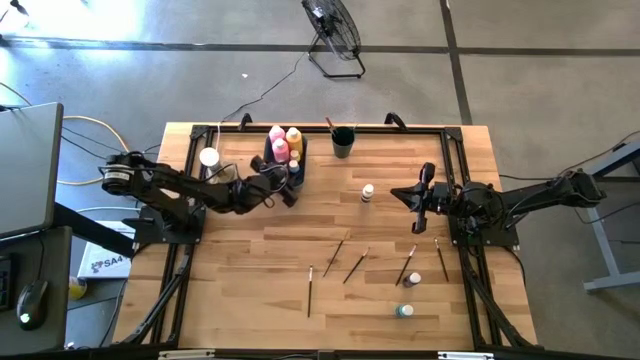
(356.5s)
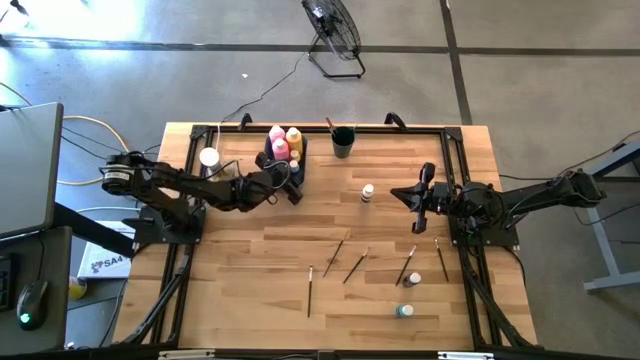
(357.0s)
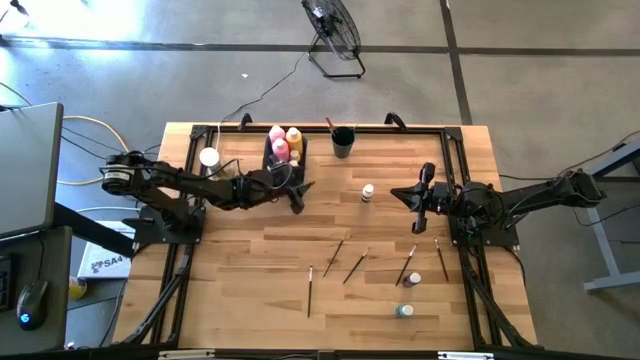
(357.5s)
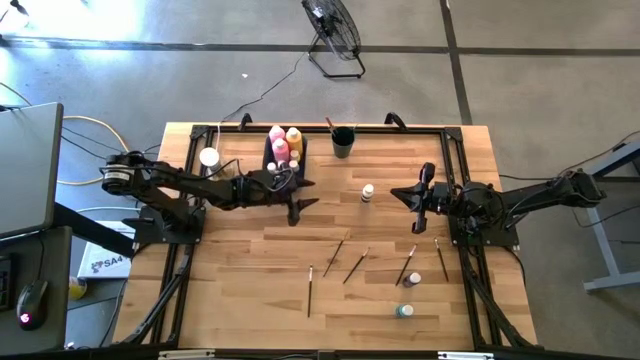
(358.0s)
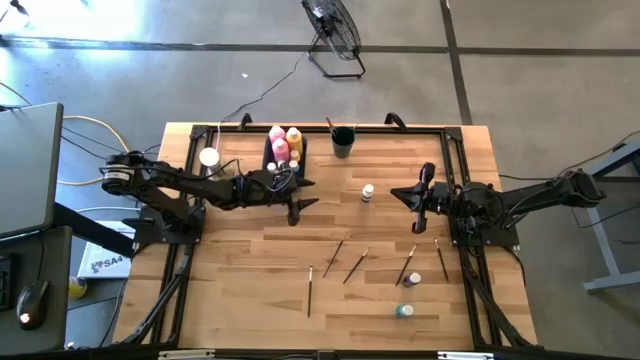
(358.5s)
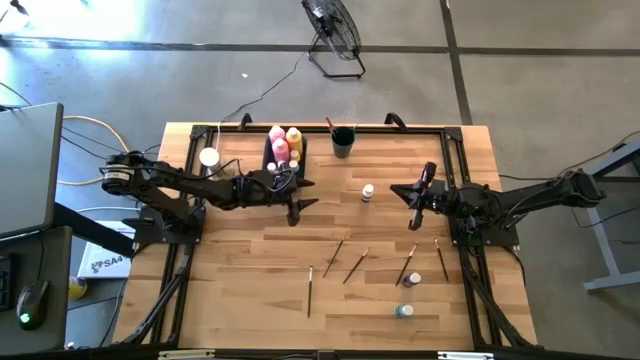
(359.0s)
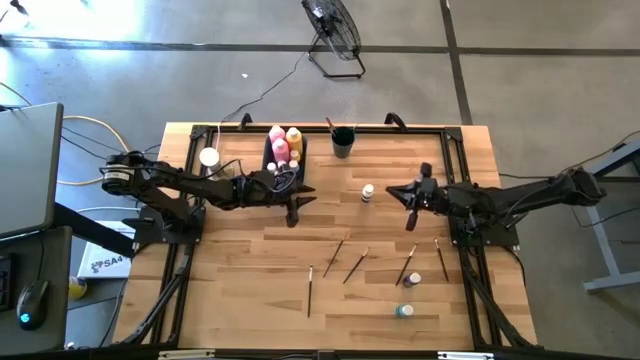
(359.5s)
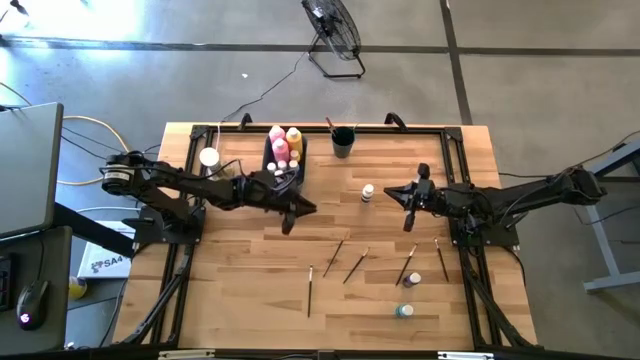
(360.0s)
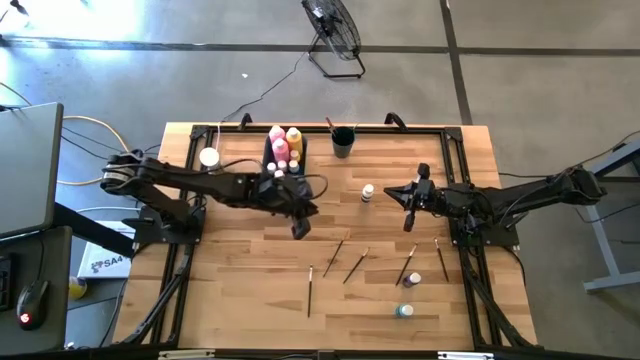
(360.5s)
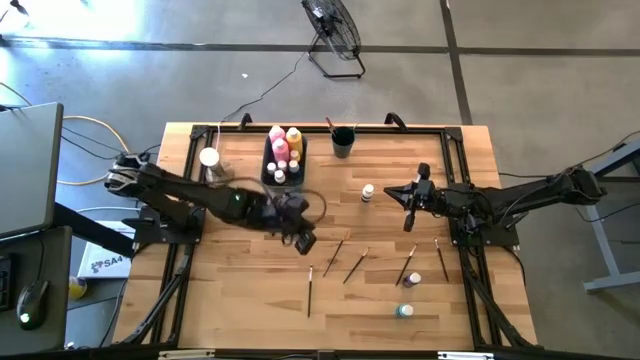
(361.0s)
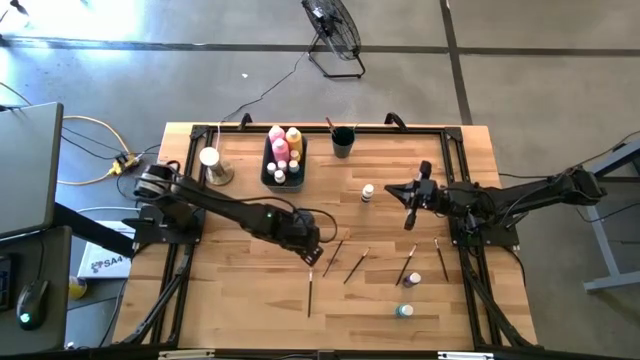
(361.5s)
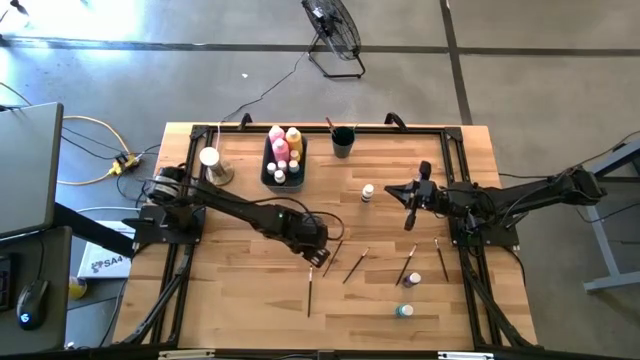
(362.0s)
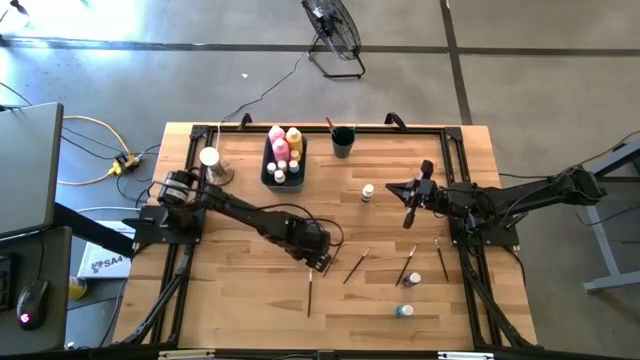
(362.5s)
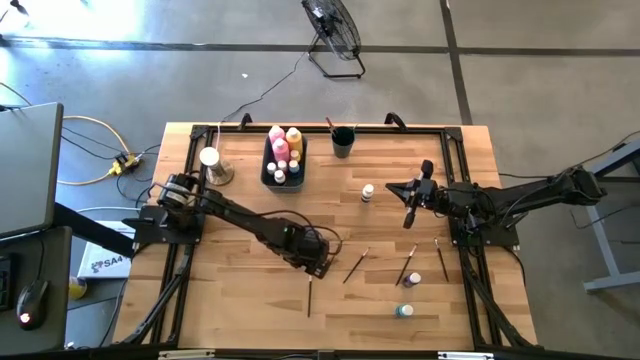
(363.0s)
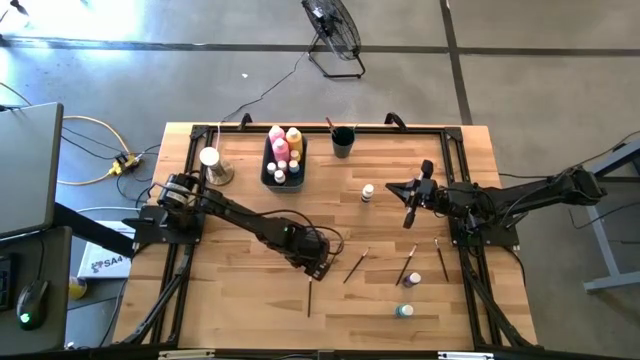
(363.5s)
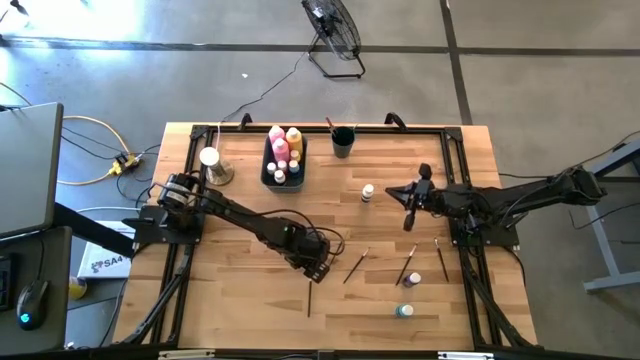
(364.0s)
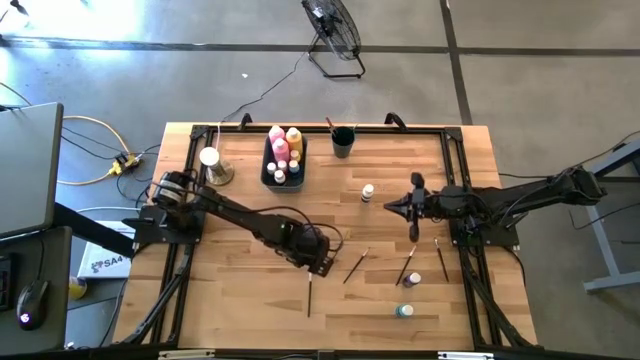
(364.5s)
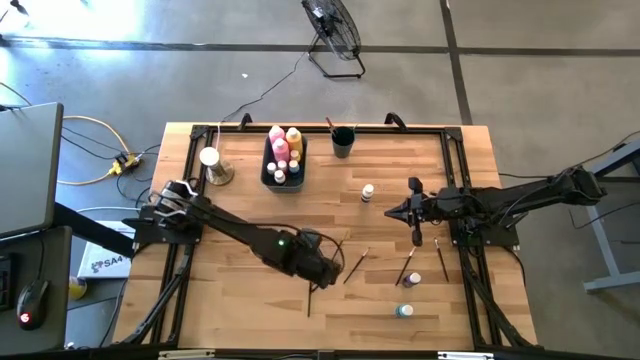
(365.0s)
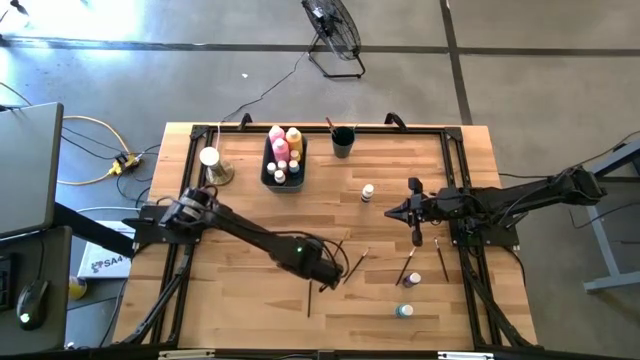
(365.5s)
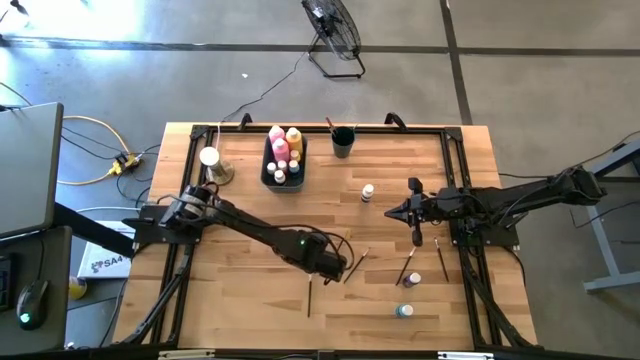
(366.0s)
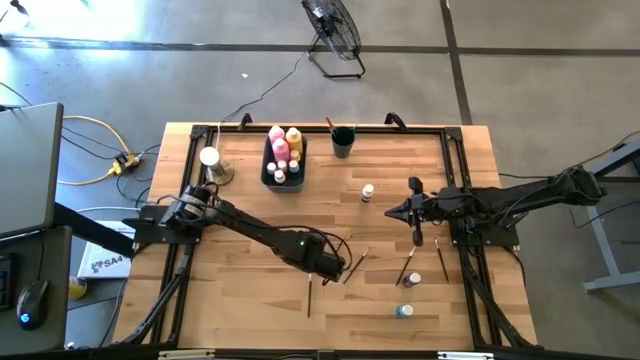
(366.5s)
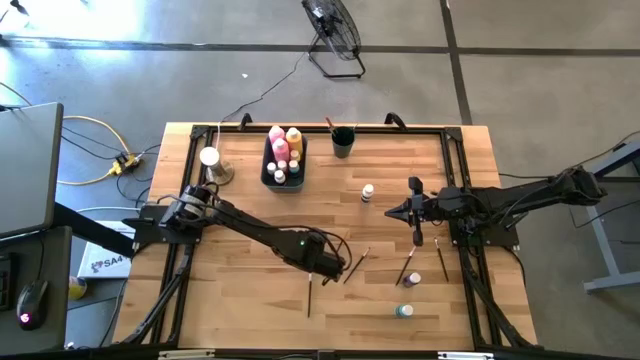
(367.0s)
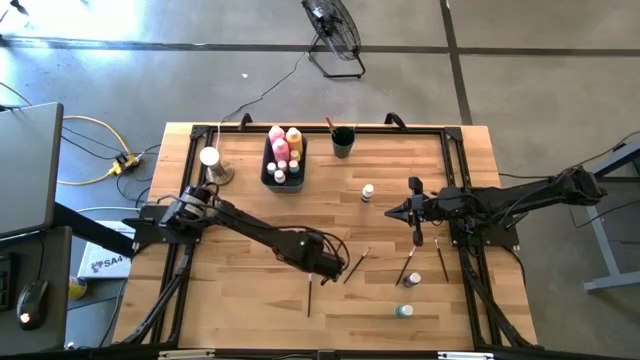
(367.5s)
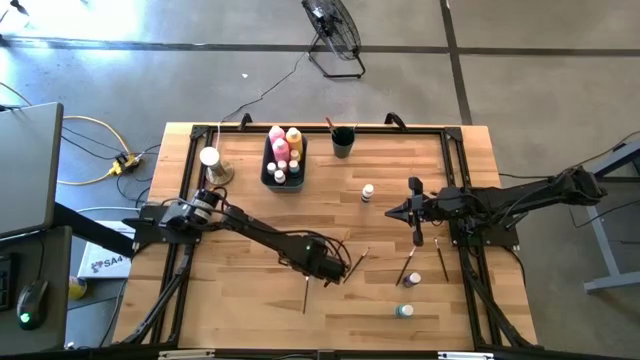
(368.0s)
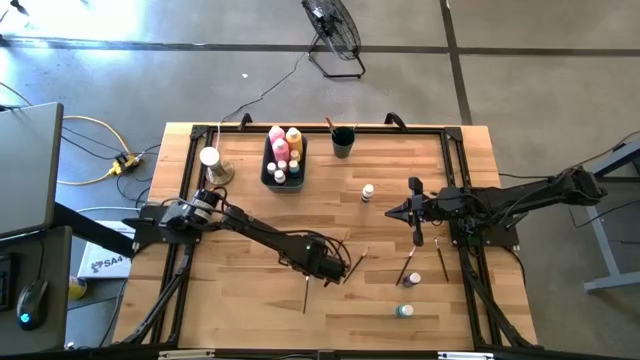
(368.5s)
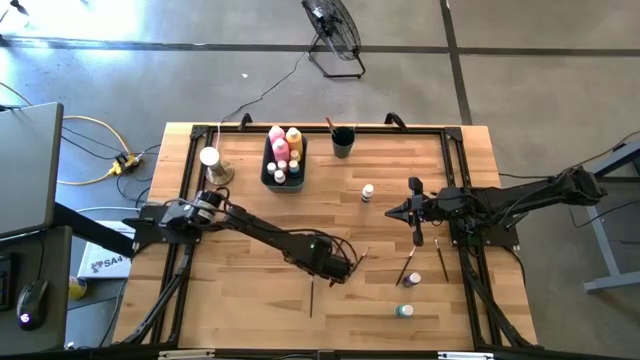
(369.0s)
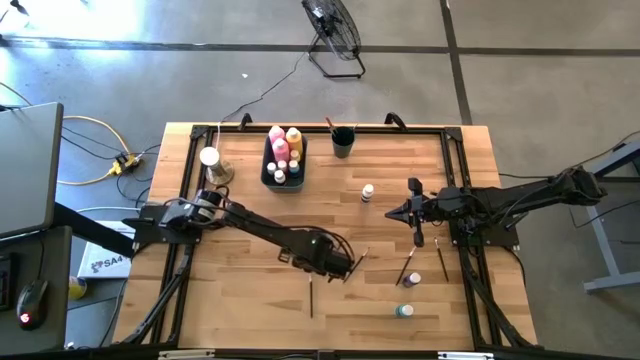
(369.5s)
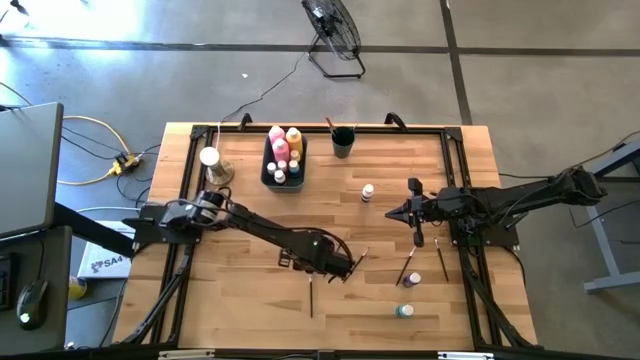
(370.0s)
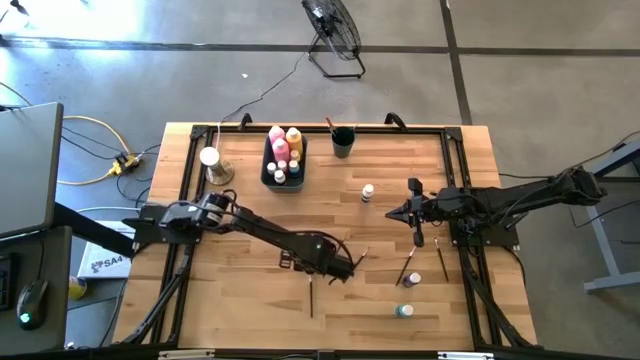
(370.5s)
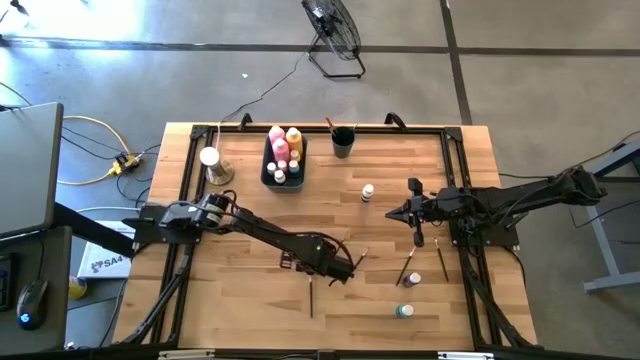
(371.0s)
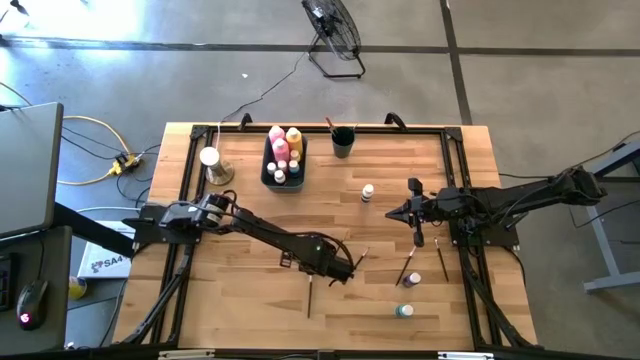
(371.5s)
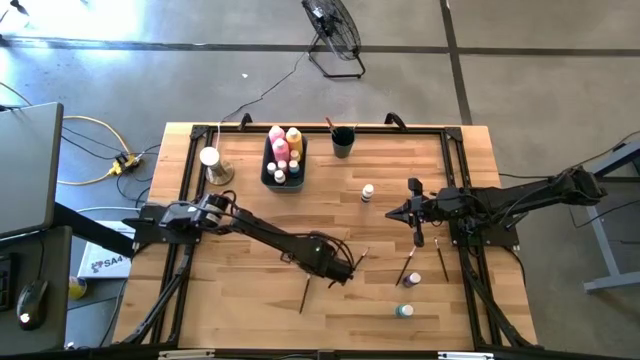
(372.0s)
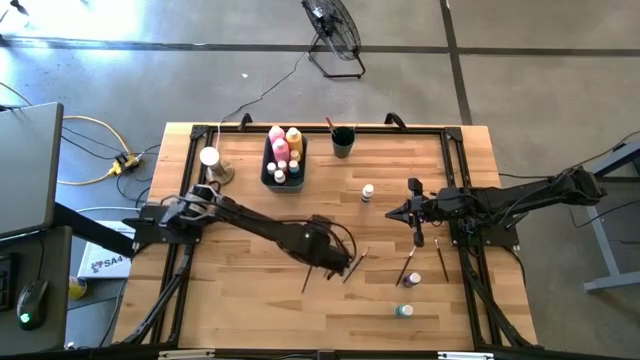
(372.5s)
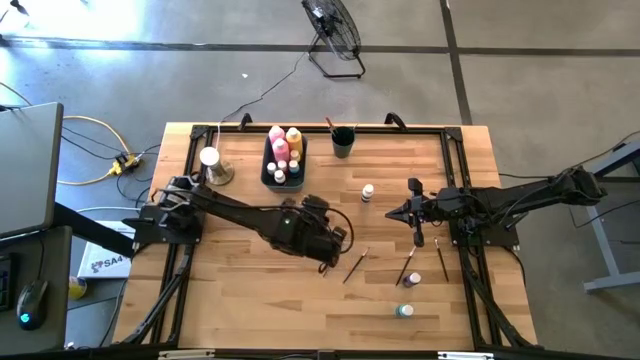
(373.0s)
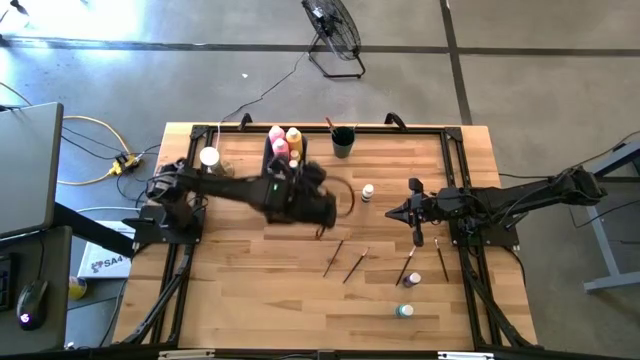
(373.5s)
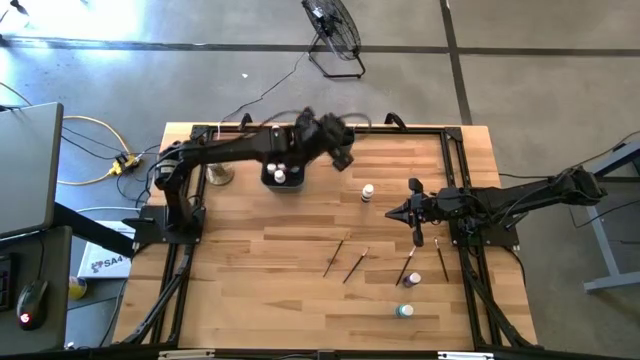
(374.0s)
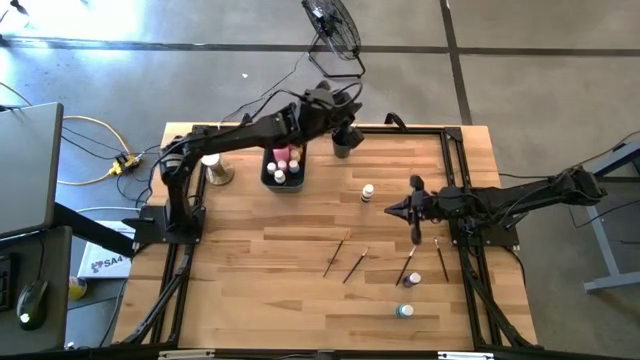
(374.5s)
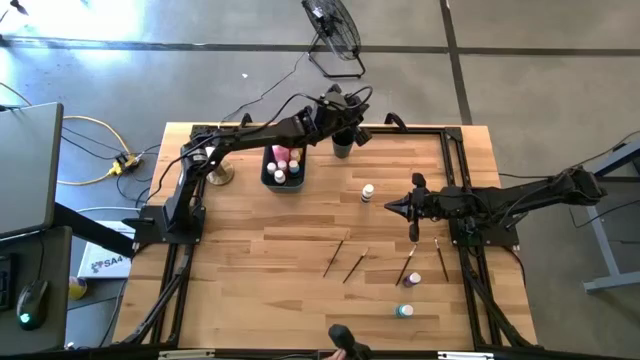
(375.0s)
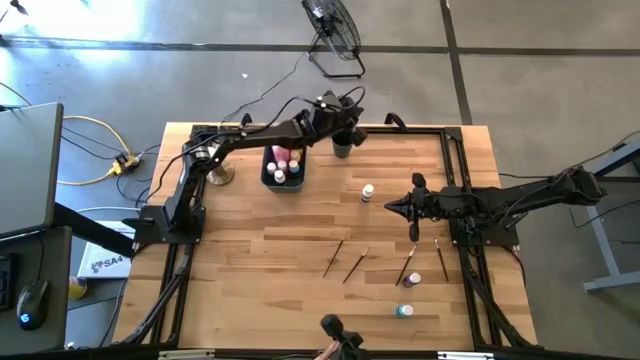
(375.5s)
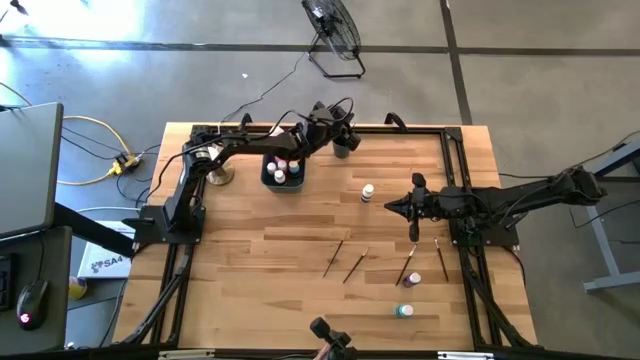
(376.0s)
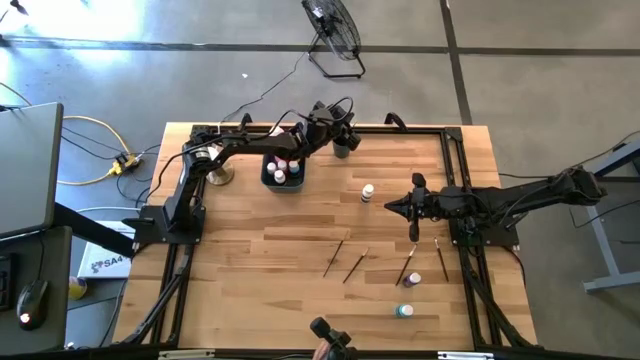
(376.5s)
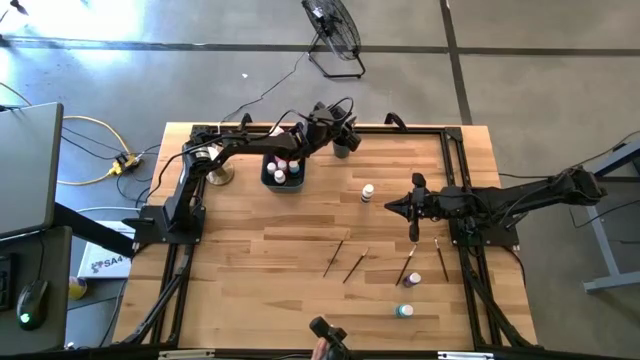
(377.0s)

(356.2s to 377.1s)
Task: Pick & Place Paint Supplies
Put the silver paint brush into the green cup

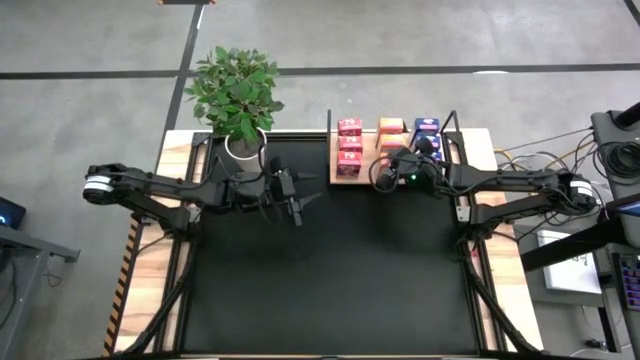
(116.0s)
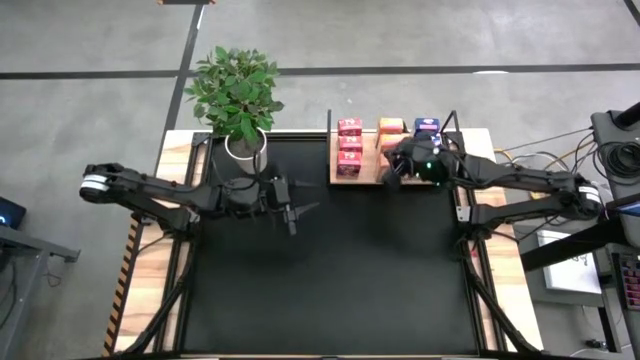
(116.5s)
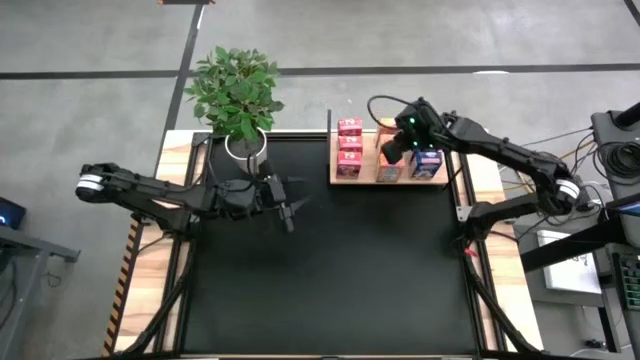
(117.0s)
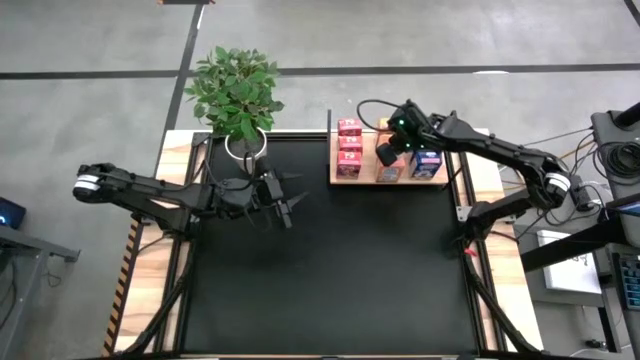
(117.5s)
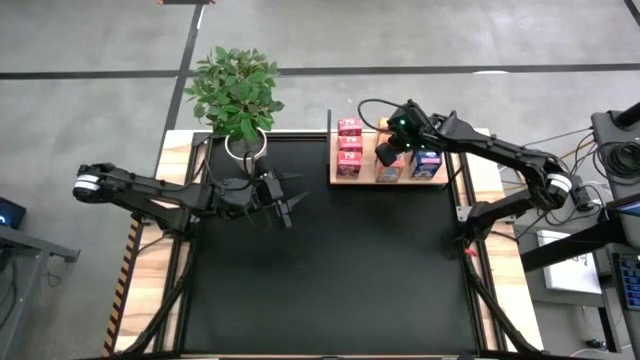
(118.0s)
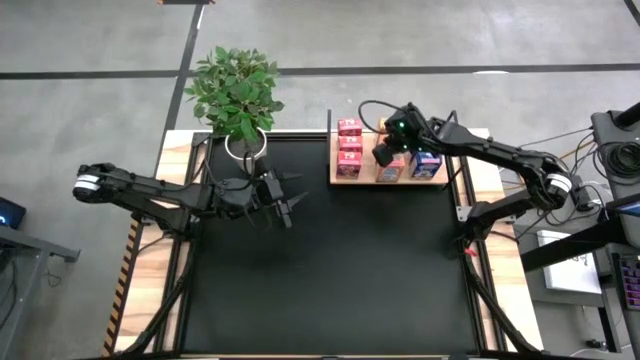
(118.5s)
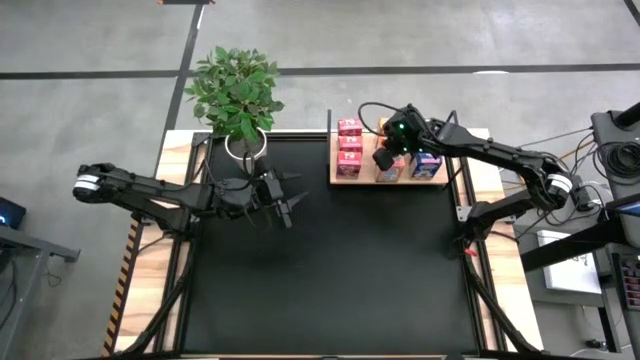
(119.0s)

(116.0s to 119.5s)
Task: Stack cereal on shelf
Adjust the middle orange cereal box on the shelf
